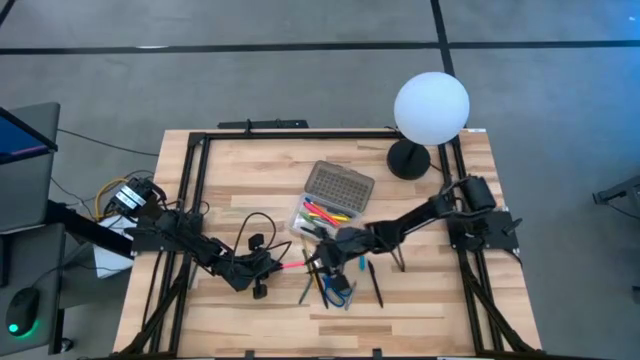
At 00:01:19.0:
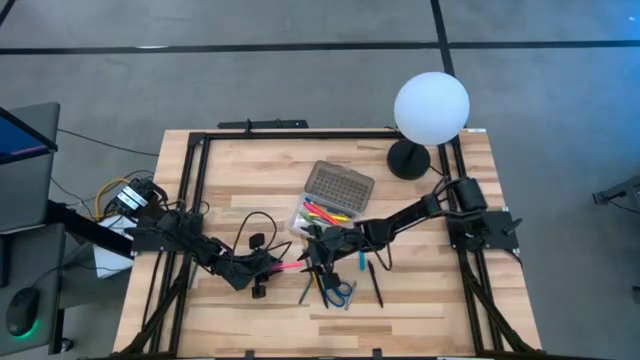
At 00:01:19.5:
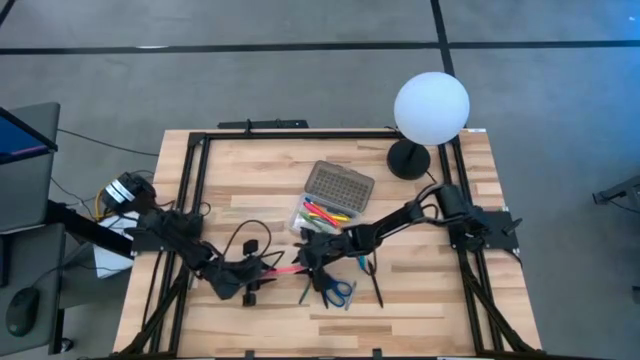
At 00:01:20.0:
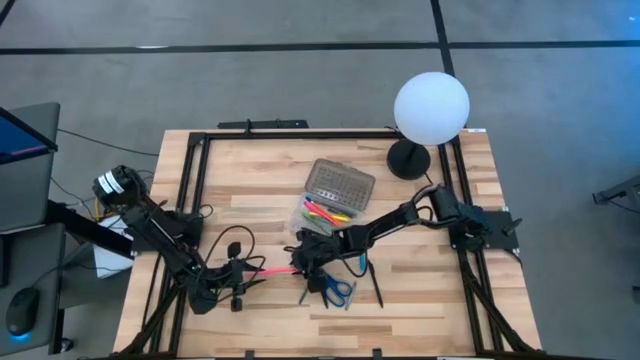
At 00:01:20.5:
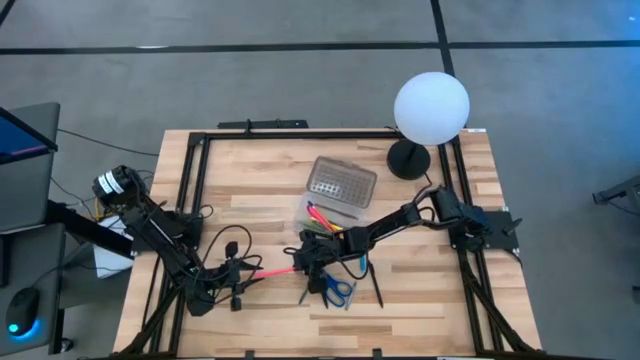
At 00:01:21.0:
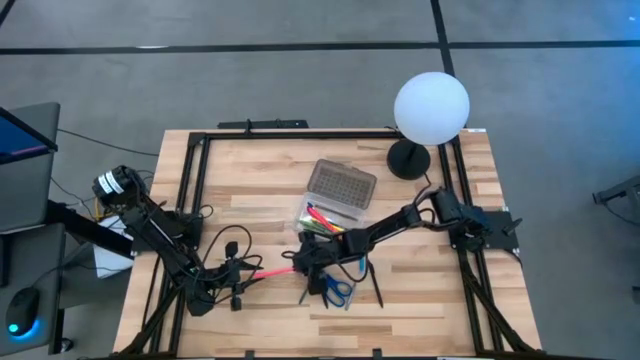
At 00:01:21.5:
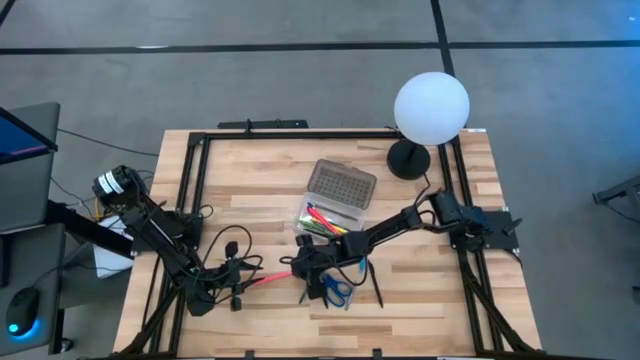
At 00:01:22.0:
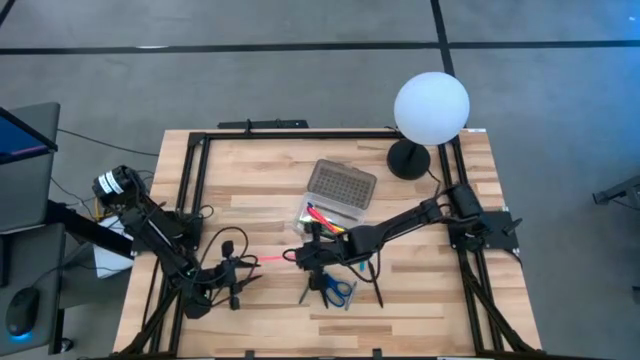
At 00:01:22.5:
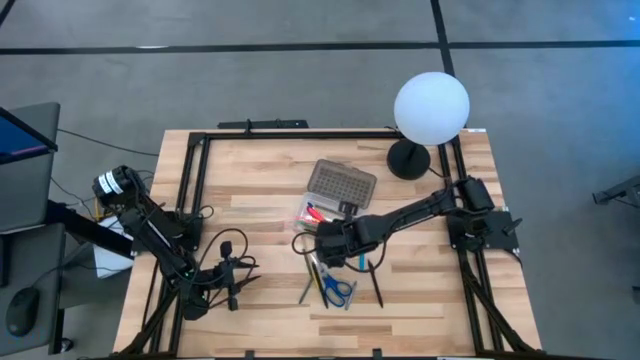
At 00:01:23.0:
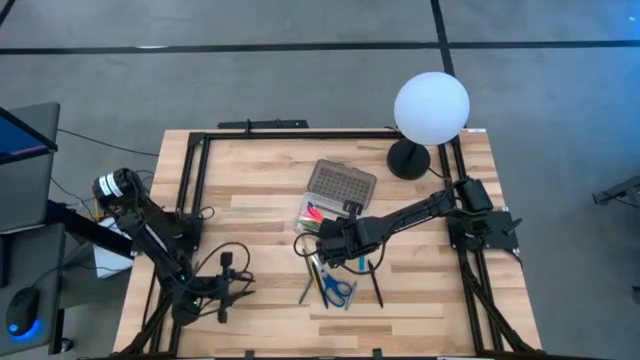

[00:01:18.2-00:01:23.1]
Task: Pick & place school supplies into a supply box
Put the pink pencil into the gray supply box

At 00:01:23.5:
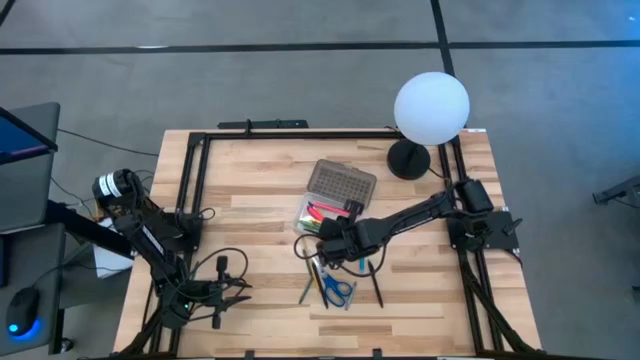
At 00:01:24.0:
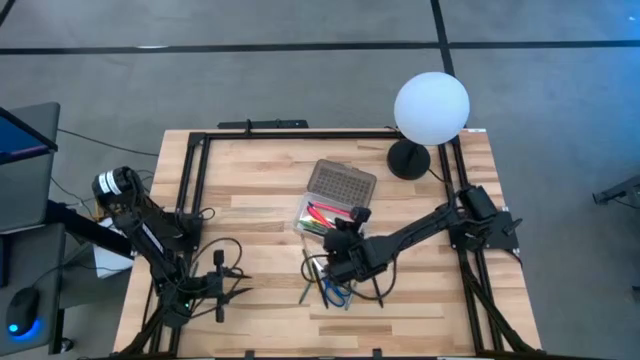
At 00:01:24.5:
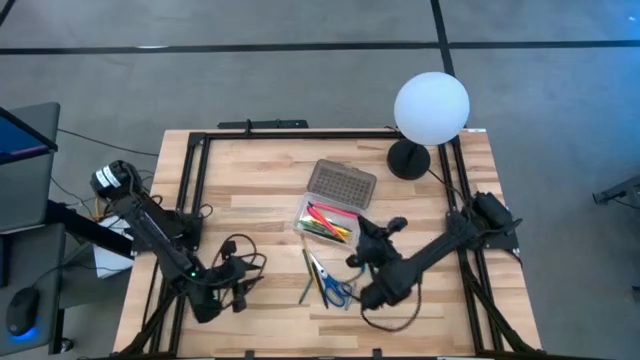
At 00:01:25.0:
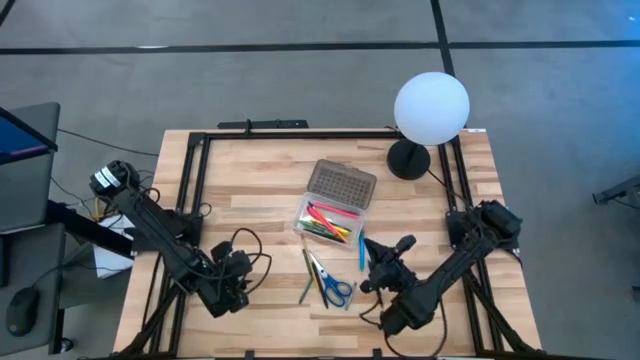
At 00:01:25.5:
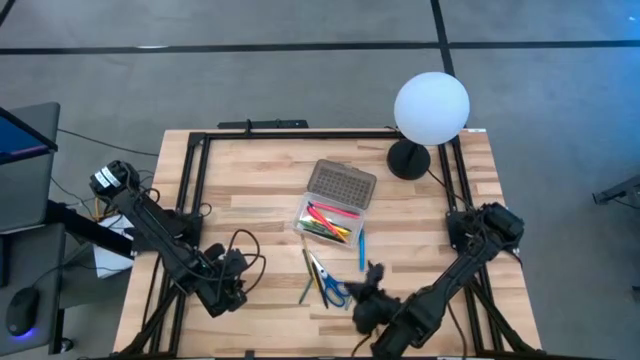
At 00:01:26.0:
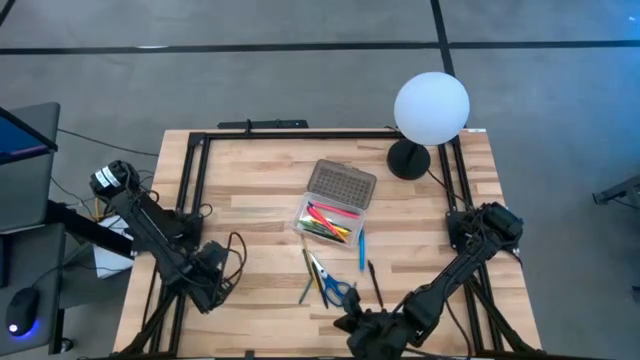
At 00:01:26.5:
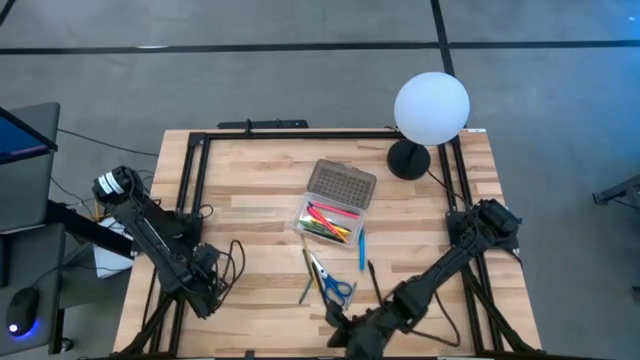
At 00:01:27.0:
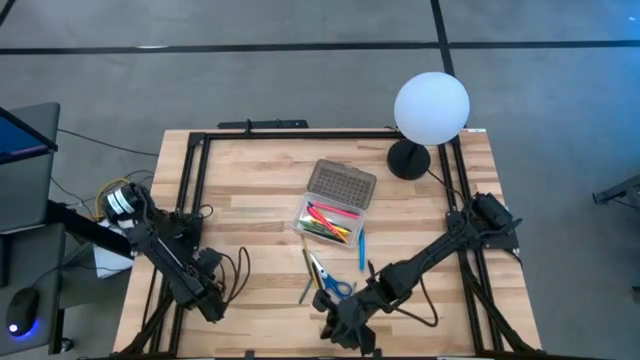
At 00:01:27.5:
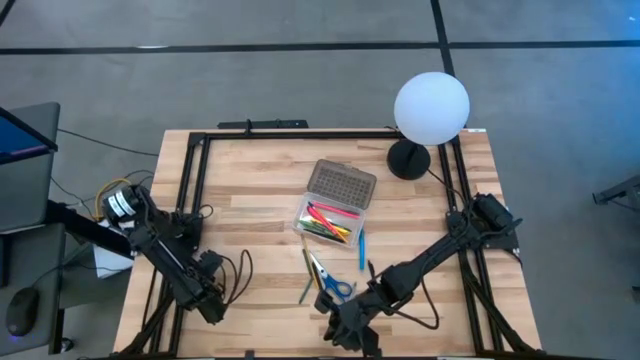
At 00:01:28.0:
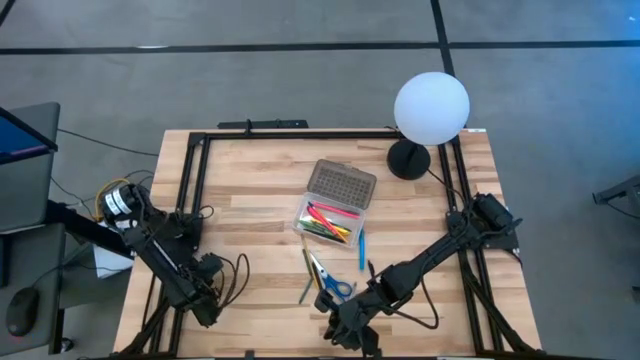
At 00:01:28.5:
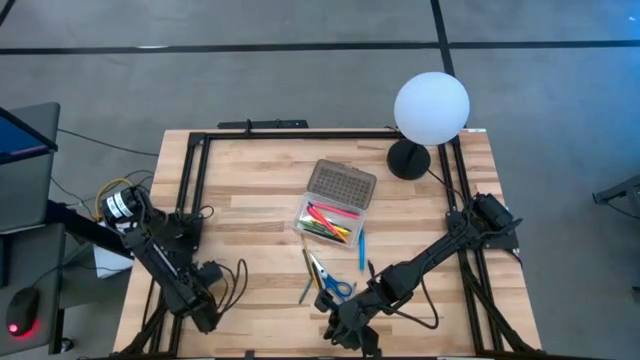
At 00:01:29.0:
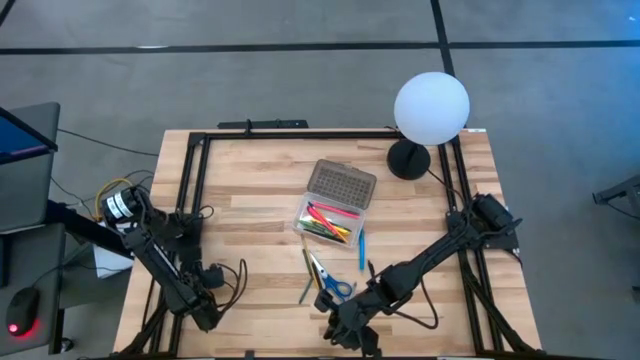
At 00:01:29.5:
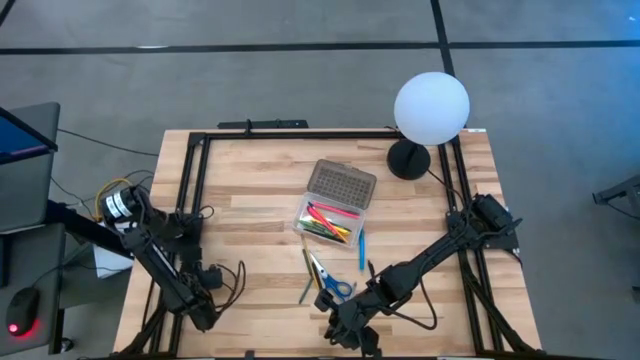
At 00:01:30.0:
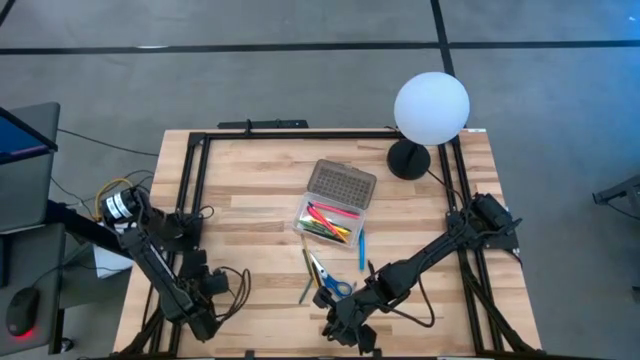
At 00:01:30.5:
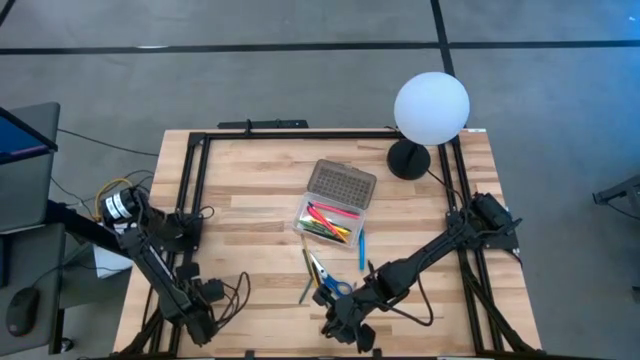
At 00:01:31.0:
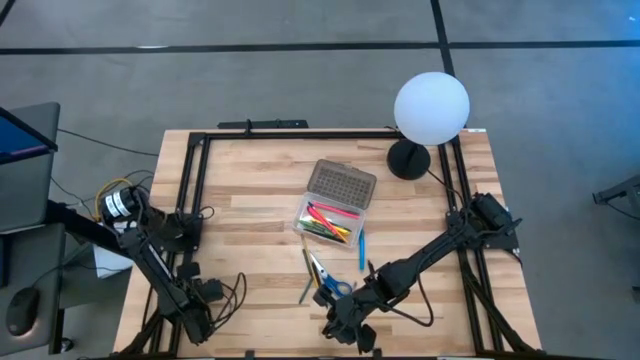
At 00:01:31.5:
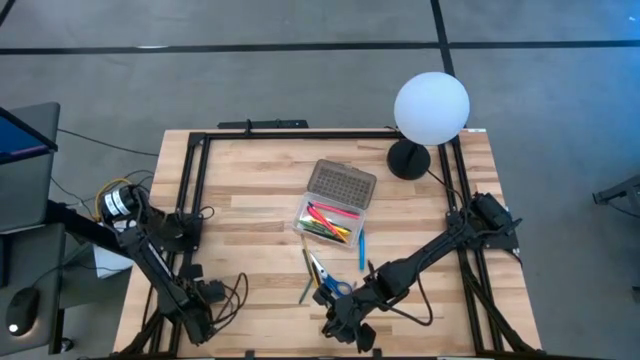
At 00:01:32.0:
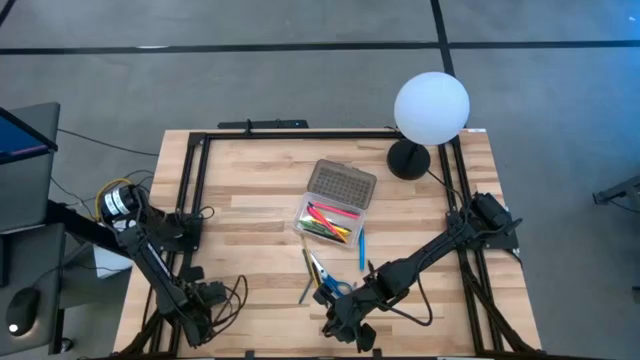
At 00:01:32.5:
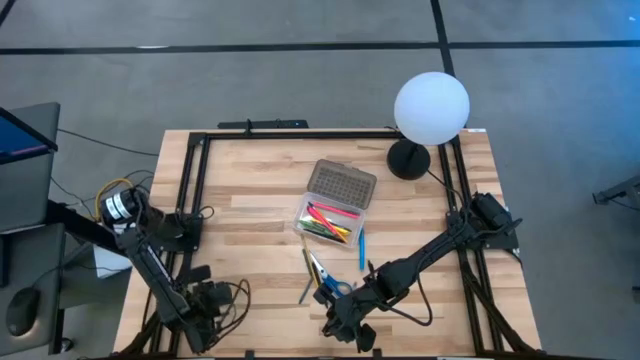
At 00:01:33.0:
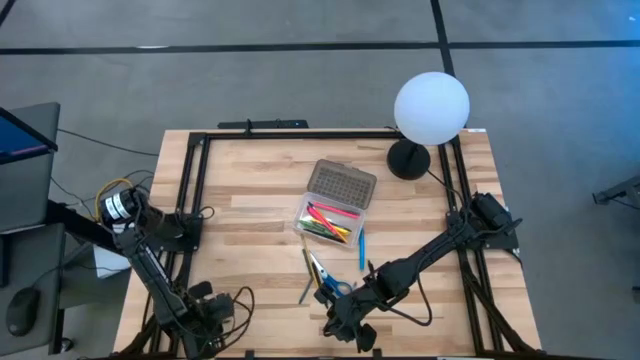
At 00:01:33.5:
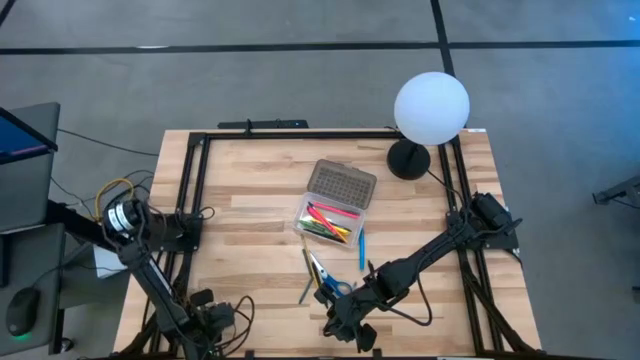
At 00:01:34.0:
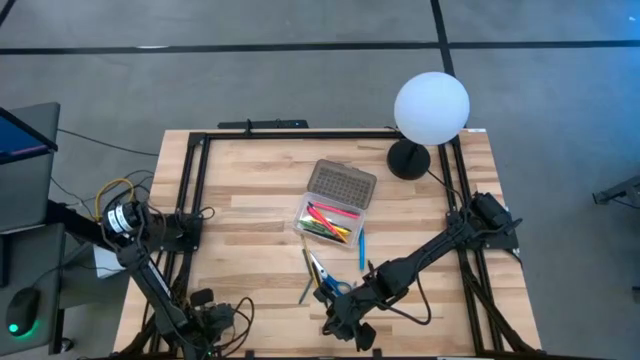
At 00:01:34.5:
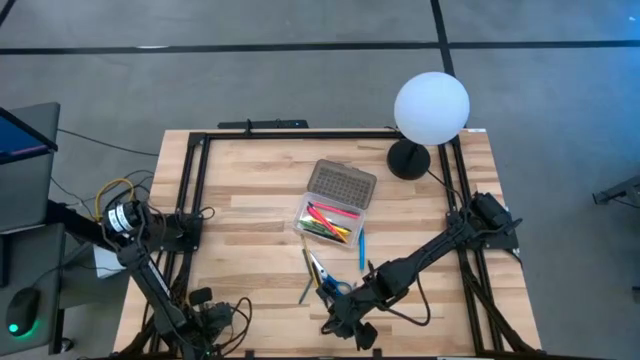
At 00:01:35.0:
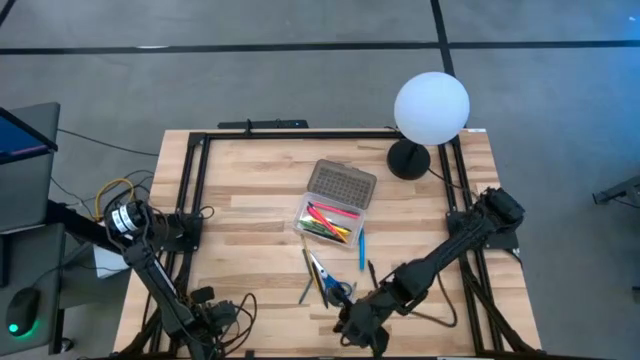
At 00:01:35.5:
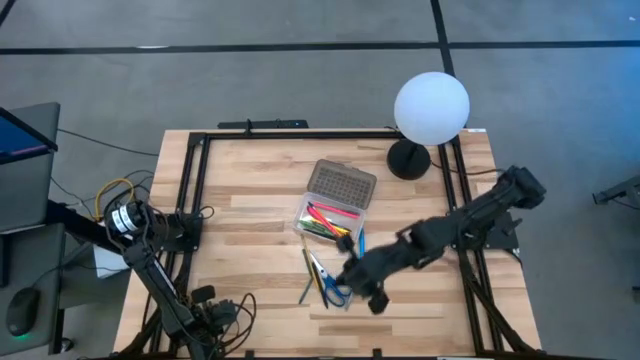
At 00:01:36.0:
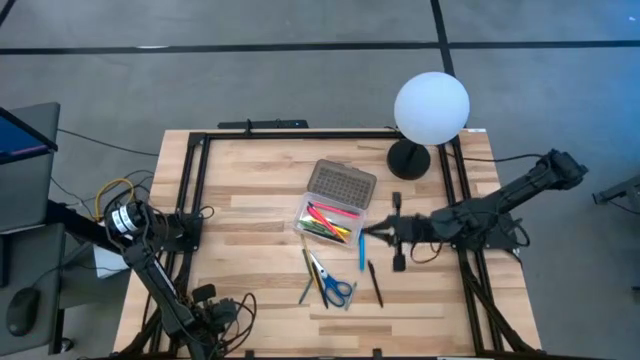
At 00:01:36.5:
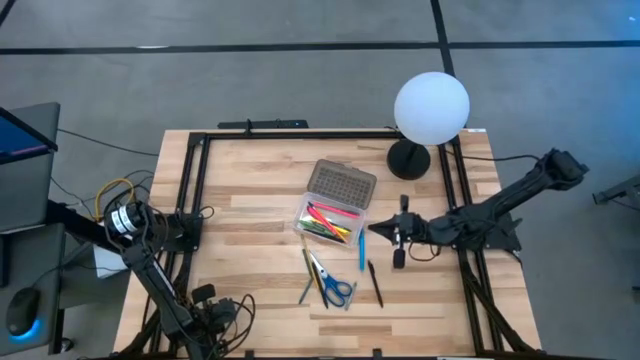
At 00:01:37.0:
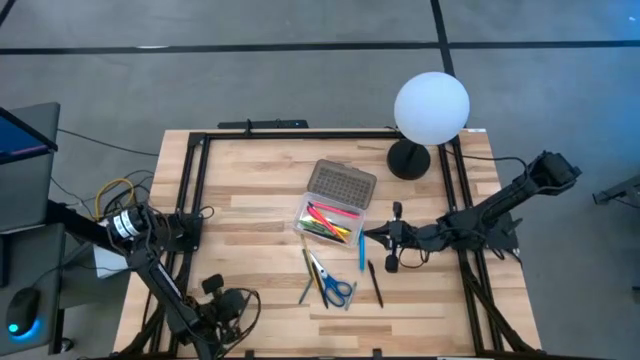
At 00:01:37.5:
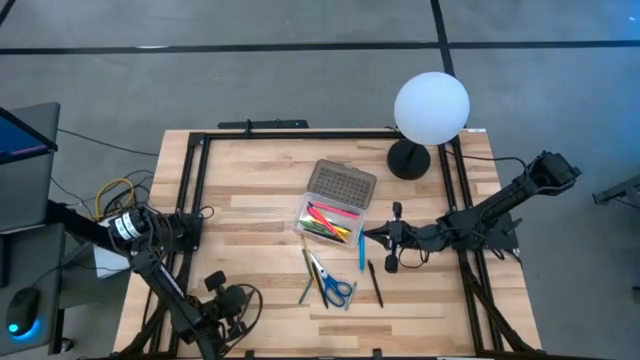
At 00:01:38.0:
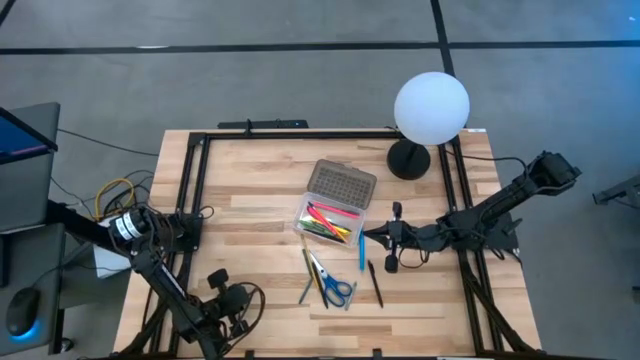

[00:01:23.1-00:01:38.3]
Put the green crayon into the gray supply box
